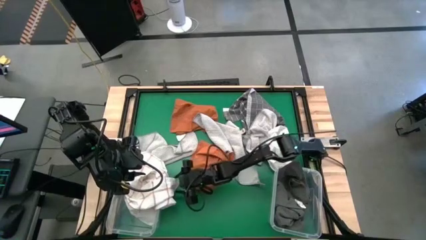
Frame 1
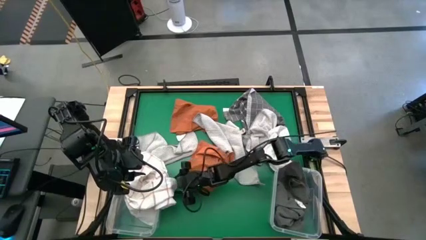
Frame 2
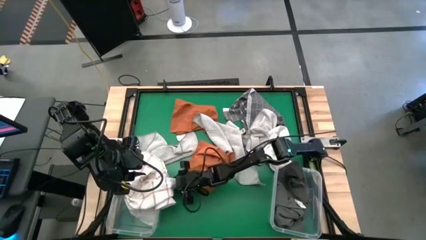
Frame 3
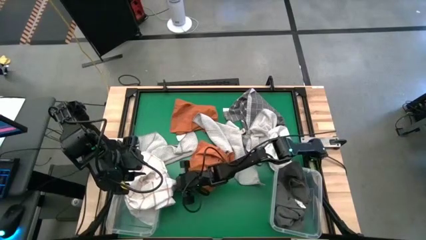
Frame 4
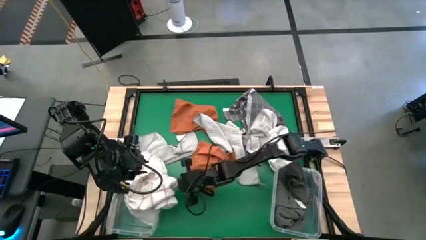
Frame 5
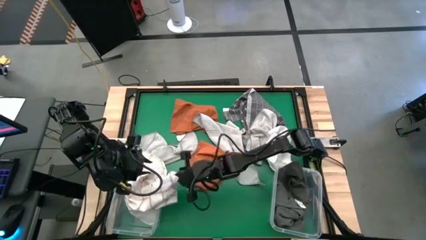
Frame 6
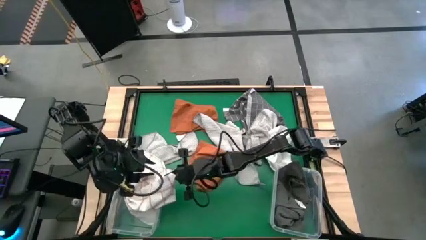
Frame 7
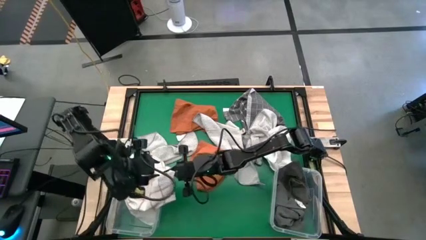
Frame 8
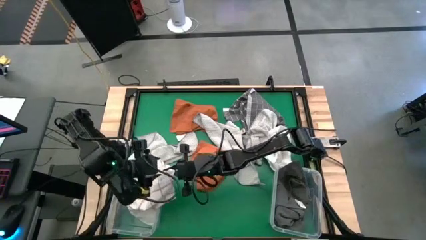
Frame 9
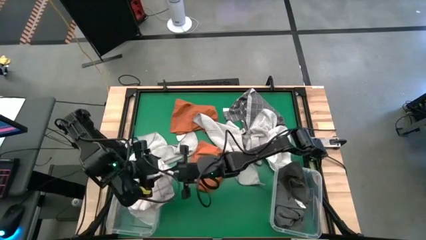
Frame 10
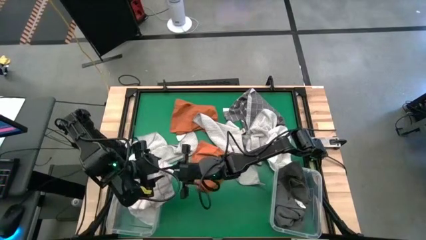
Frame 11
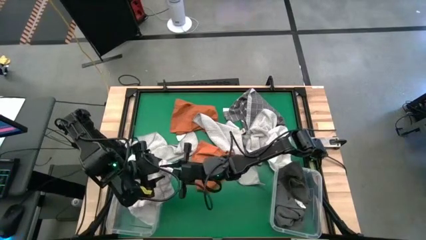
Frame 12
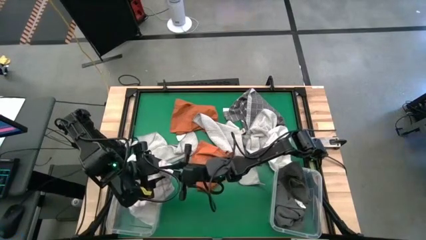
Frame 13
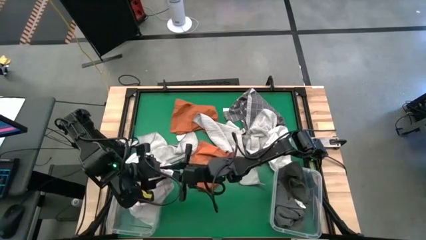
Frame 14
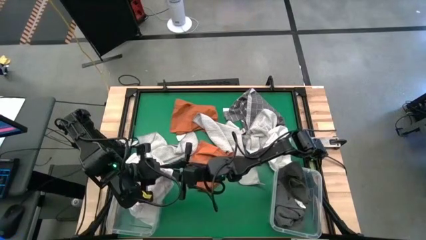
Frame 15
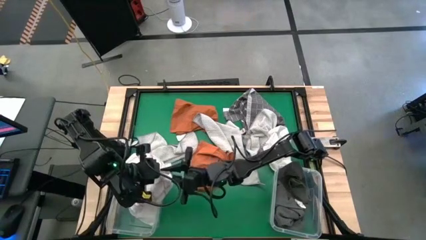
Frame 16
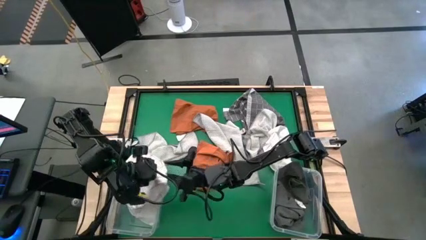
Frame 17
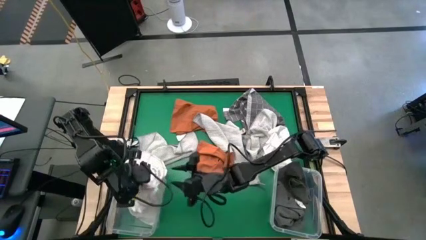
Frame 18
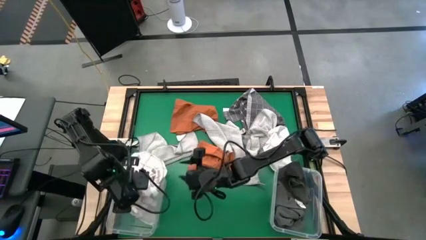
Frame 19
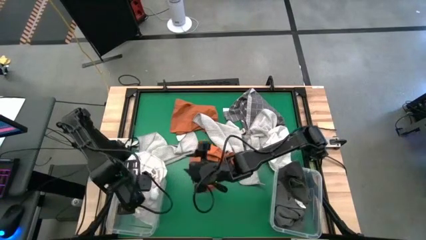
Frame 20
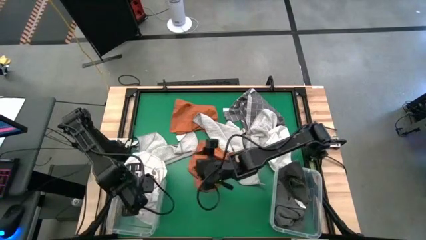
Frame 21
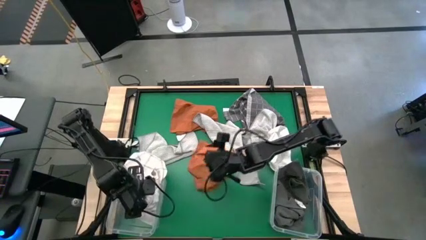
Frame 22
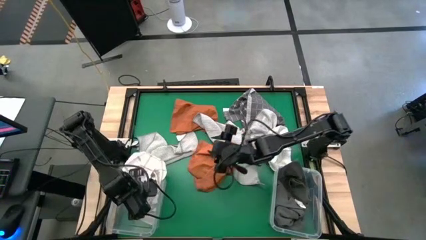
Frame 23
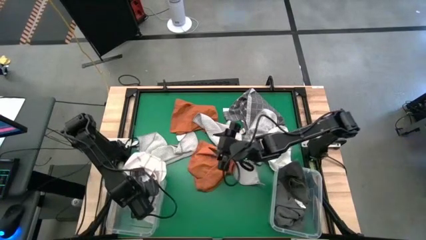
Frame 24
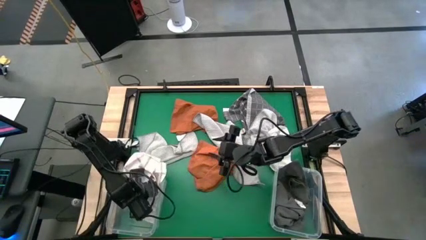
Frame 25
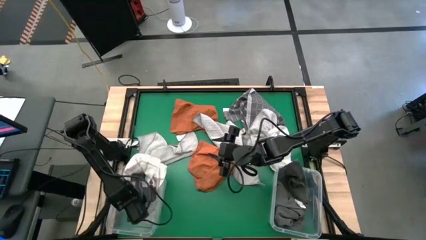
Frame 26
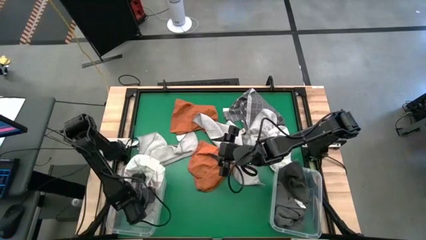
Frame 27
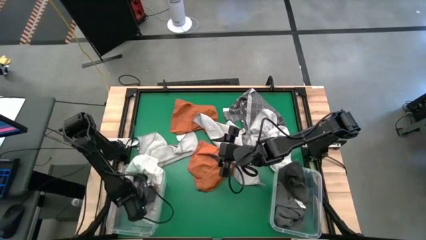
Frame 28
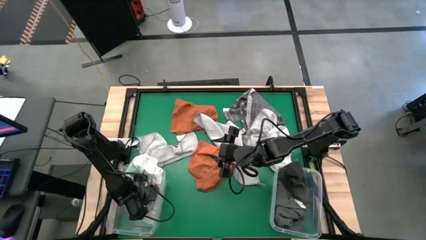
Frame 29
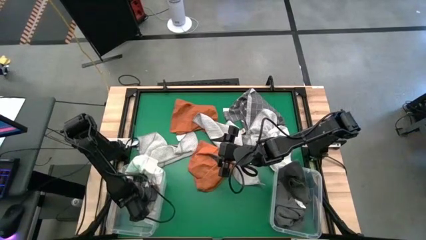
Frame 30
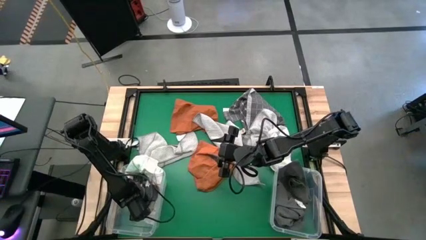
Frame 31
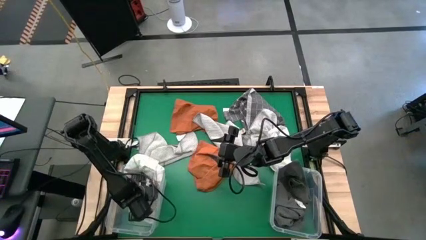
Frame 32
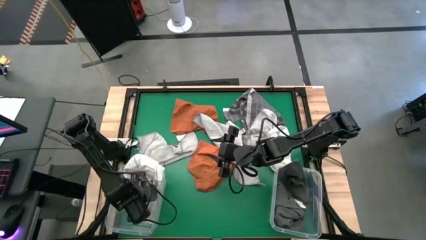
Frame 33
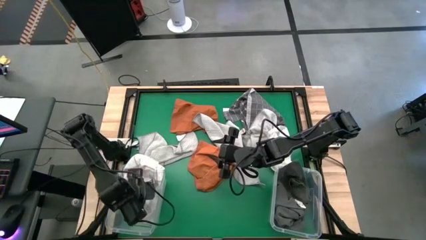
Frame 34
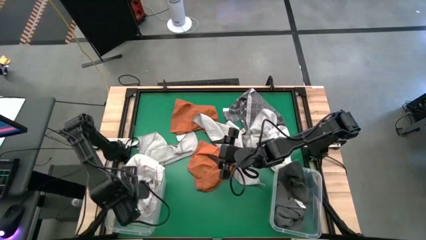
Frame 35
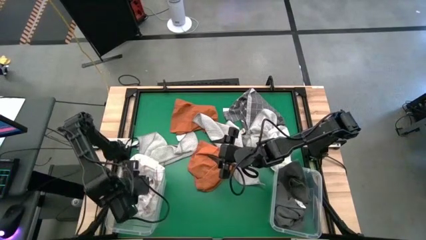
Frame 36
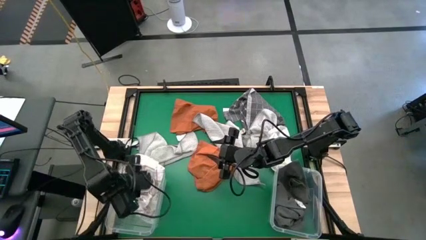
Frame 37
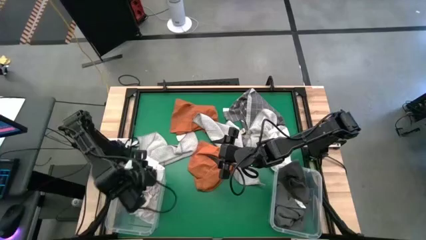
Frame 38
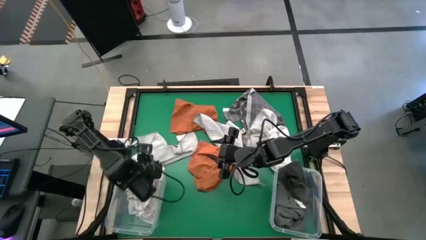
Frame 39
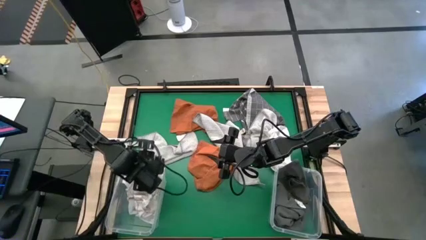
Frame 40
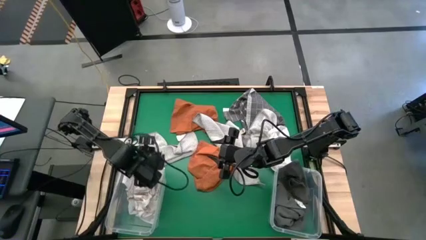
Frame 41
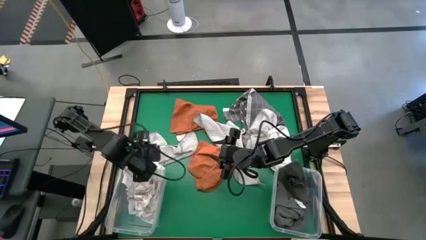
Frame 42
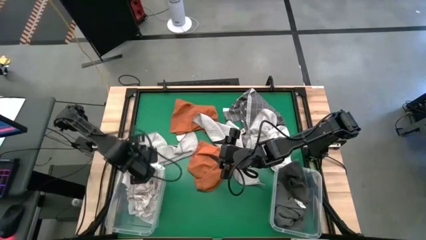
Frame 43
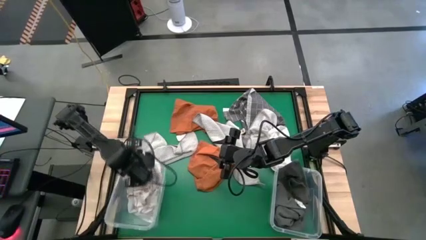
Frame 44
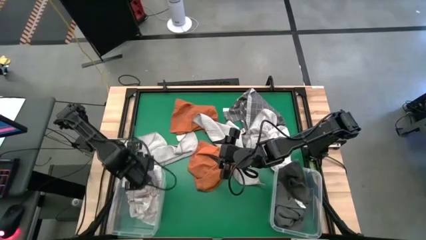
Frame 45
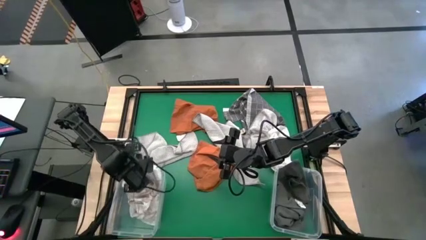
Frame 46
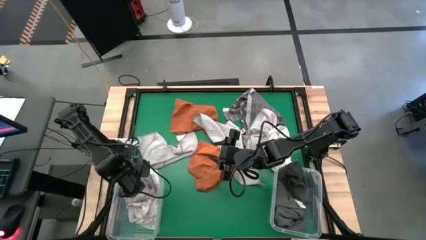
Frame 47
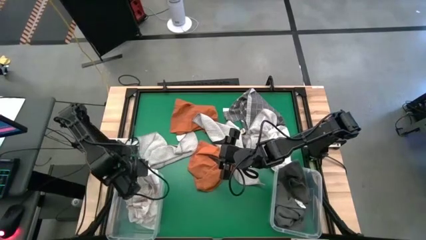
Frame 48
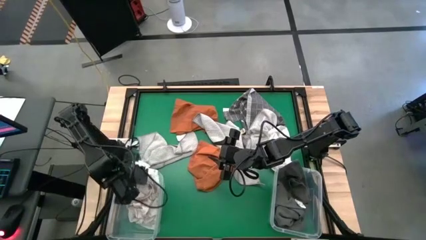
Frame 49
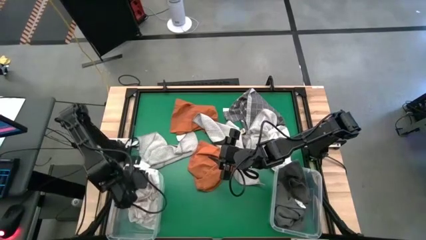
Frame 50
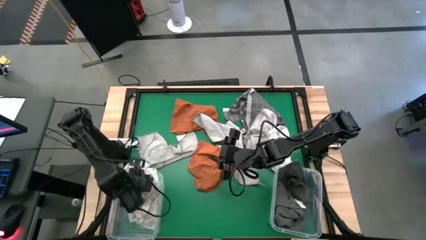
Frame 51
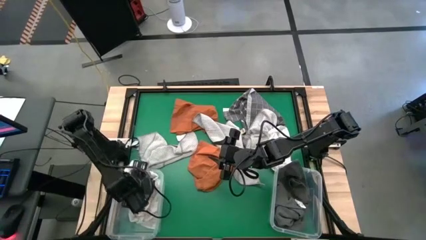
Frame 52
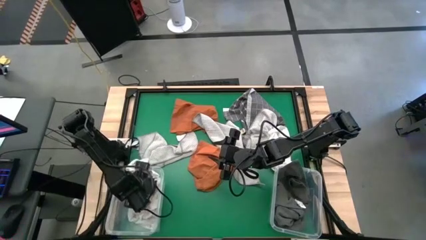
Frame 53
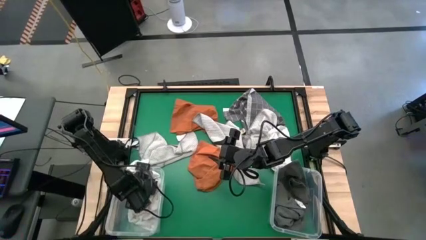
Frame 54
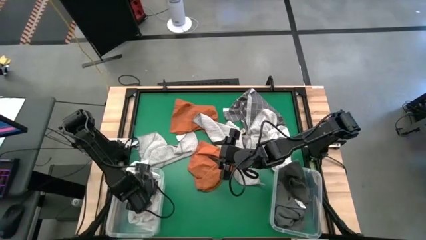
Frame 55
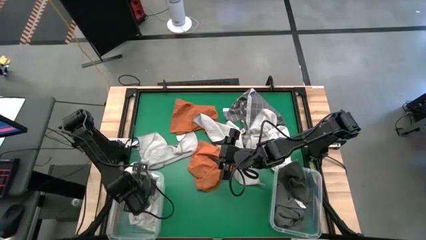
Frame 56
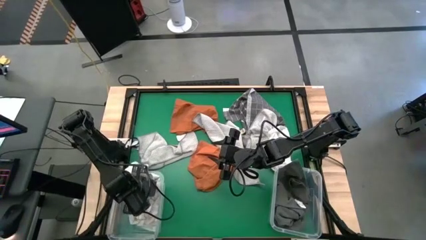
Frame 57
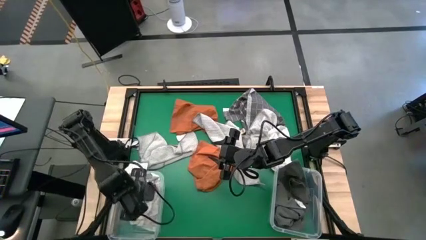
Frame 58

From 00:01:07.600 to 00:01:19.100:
Task: Sort towels by color in basket
Put the white squared towel into the left transparent bin

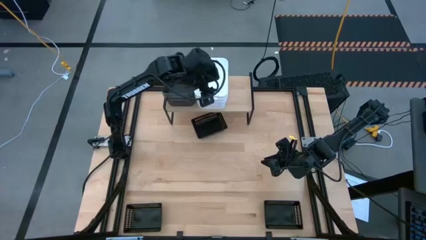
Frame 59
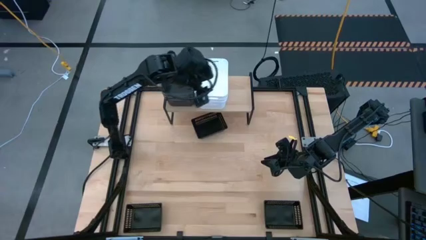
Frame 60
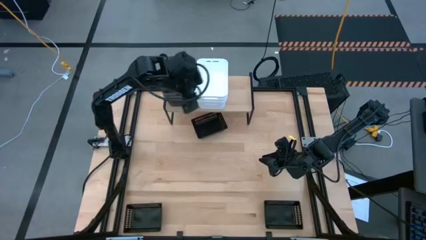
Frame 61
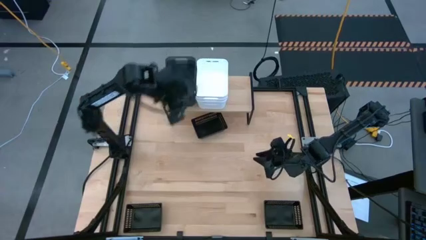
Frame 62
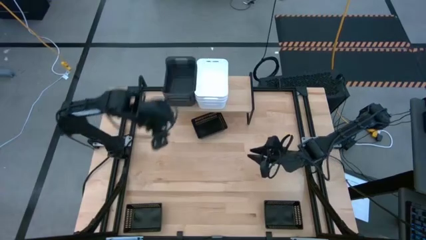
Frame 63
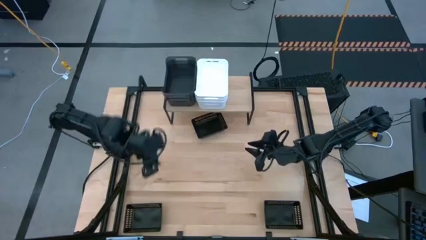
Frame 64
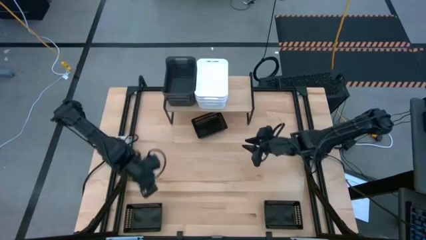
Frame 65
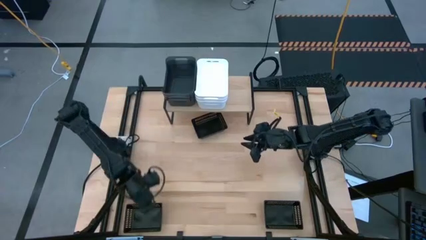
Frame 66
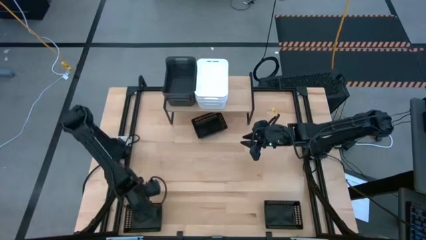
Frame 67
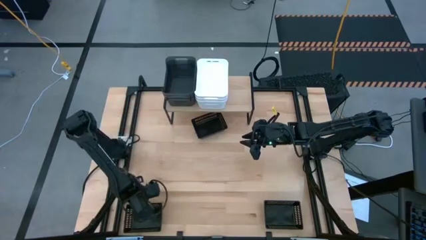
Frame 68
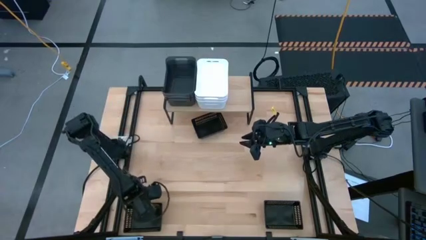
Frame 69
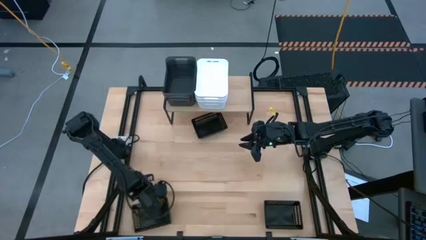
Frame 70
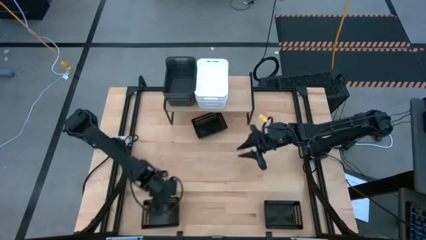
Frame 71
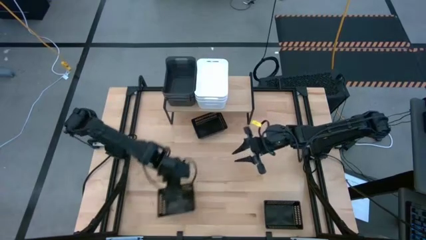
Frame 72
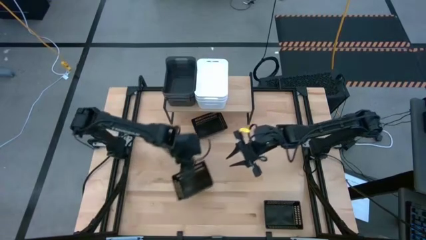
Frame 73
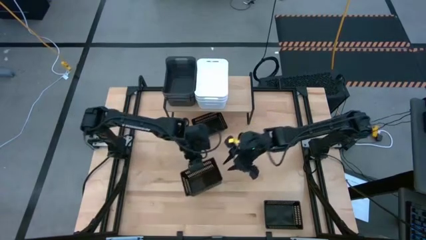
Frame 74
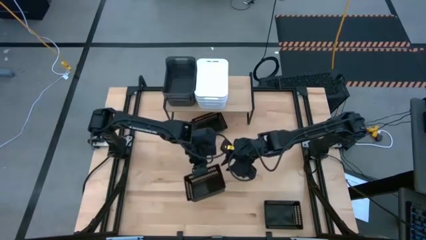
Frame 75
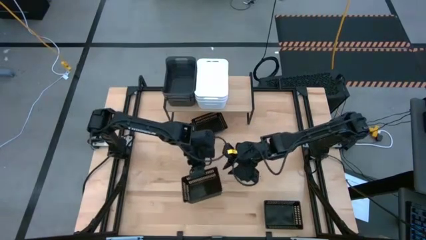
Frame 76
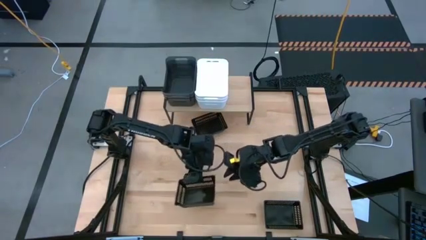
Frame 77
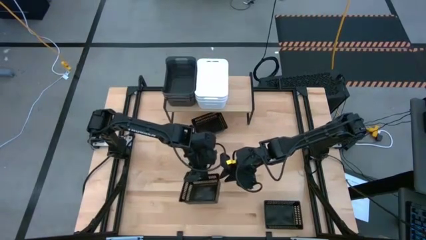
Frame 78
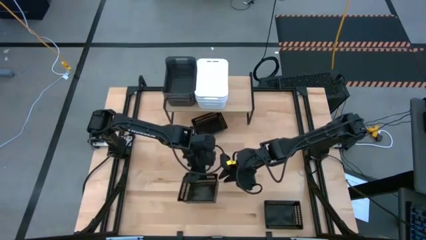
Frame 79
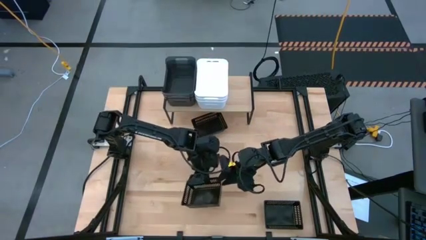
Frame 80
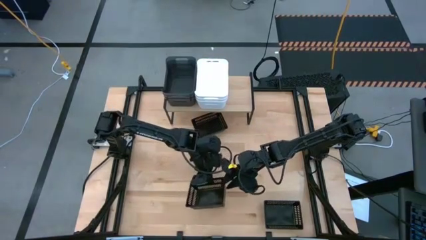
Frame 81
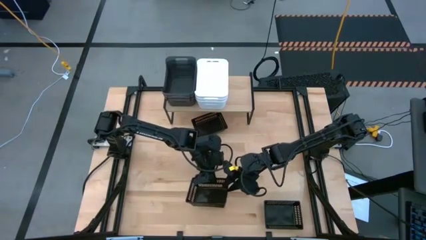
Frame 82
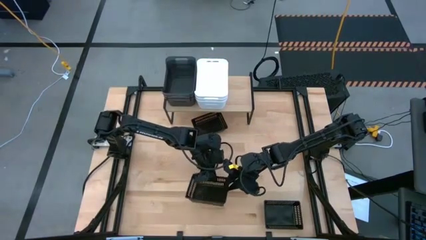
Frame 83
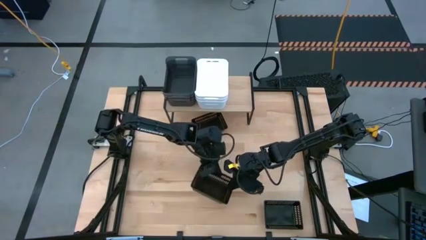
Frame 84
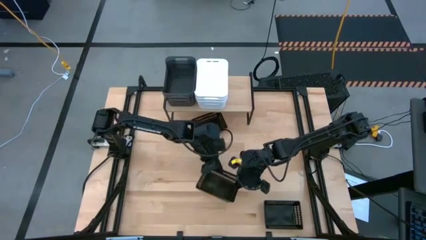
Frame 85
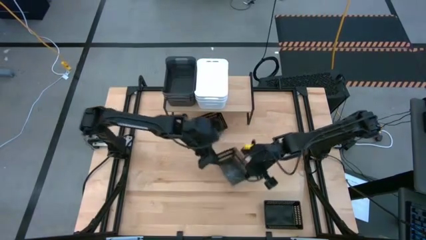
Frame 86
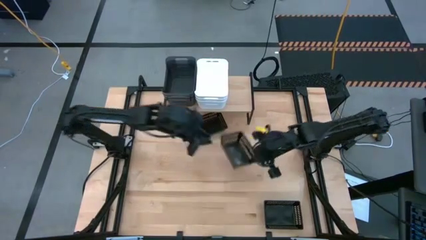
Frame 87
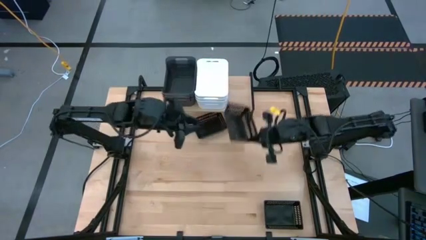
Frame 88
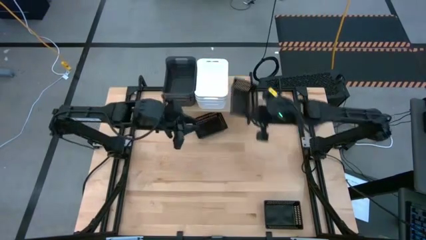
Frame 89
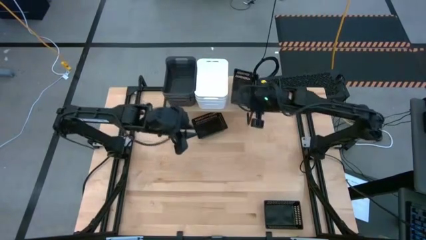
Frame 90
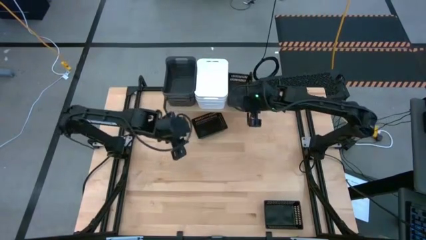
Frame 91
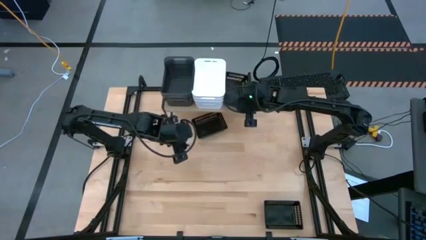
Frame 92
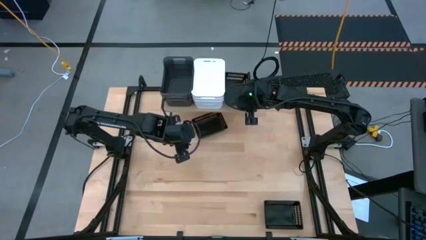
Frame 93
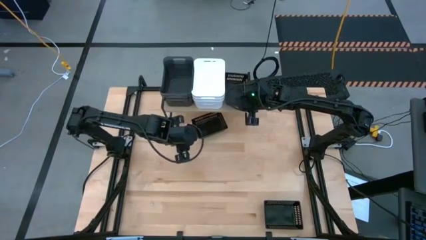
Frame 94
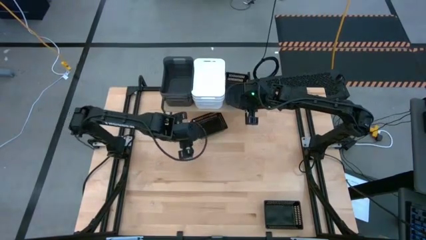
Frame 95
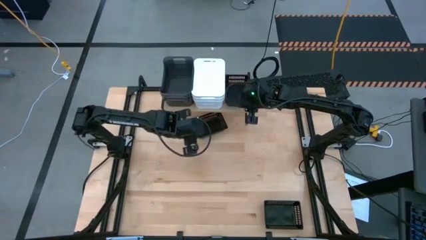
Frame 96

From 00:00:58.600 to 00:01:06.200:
Task: Stack baskets on shelf by color
Put the bottom left black bin on the shelf
